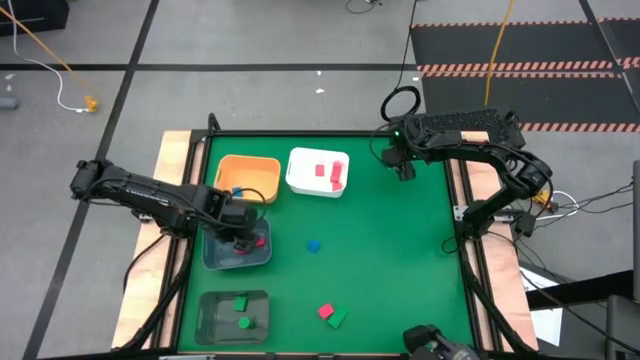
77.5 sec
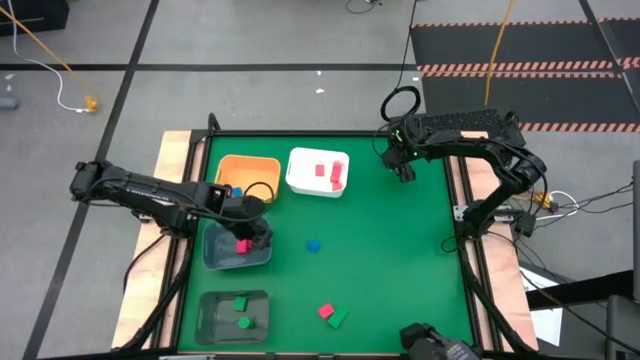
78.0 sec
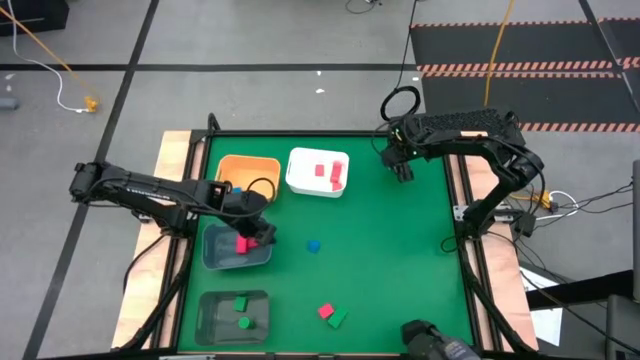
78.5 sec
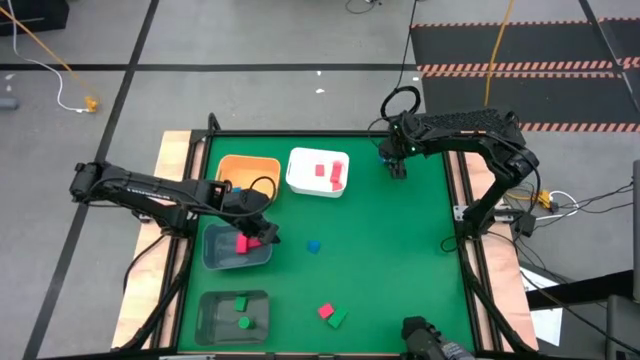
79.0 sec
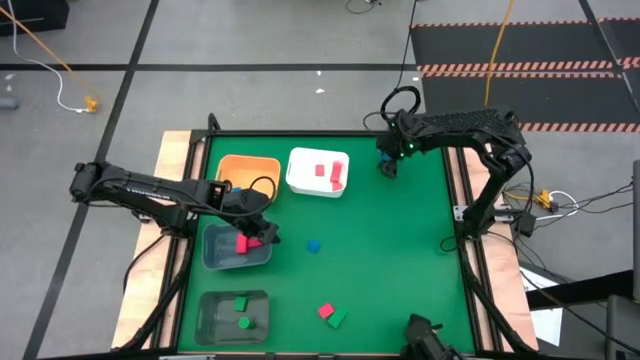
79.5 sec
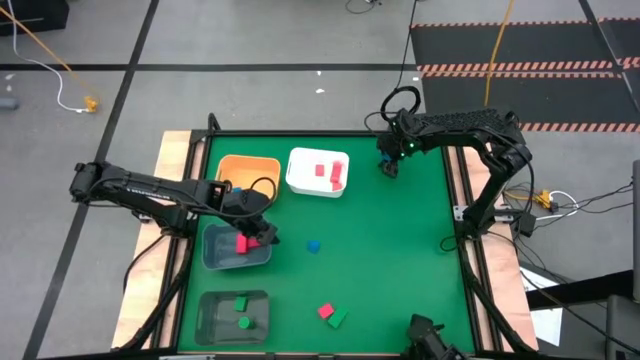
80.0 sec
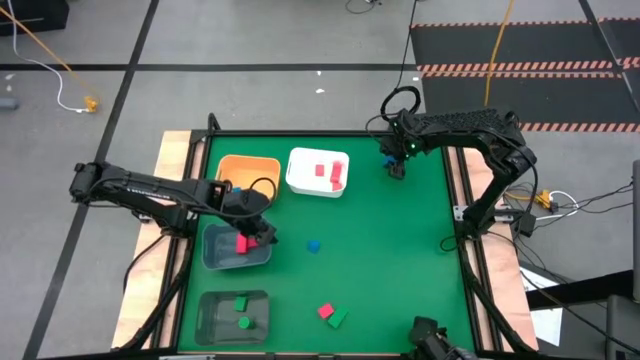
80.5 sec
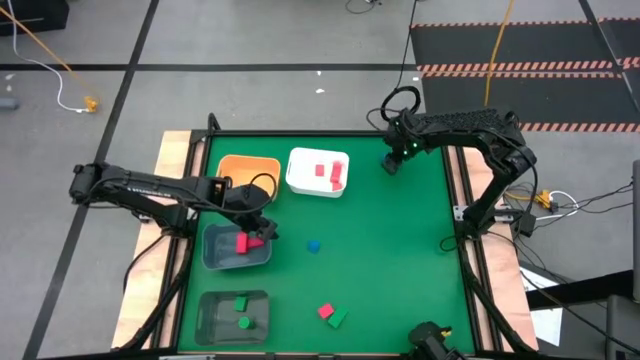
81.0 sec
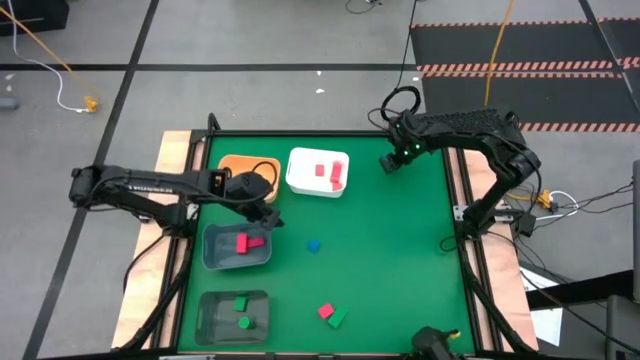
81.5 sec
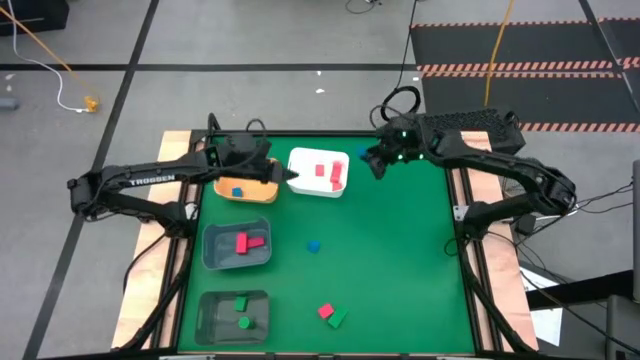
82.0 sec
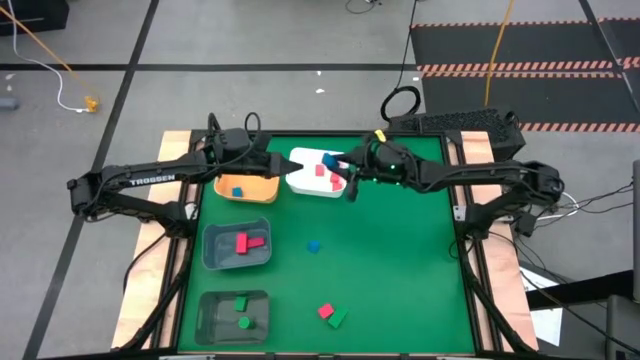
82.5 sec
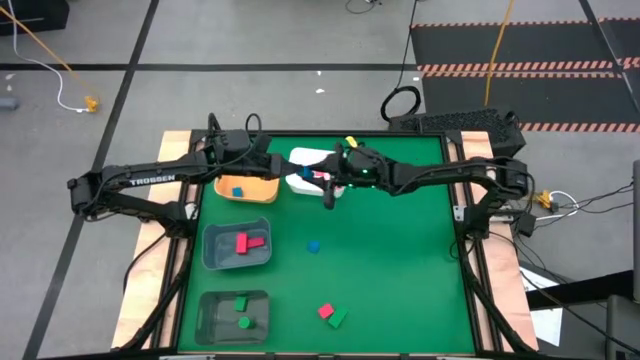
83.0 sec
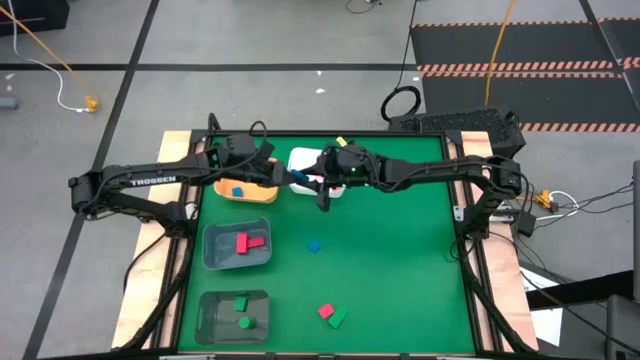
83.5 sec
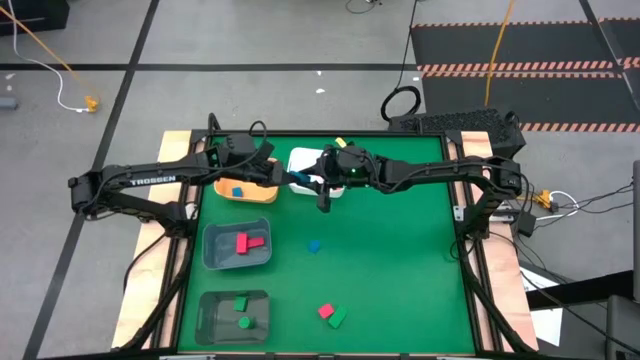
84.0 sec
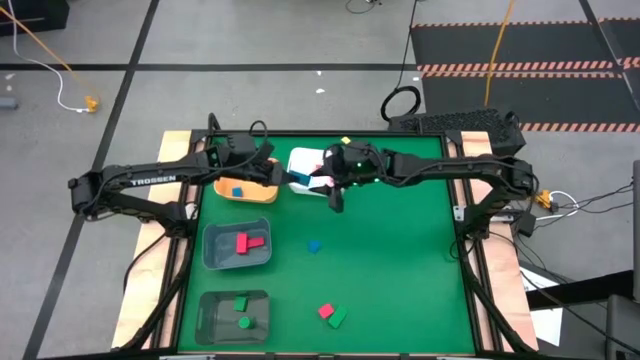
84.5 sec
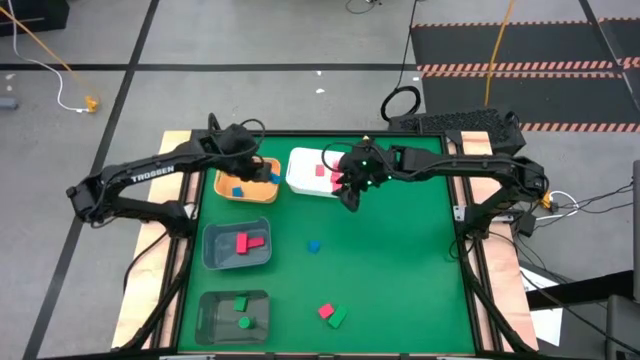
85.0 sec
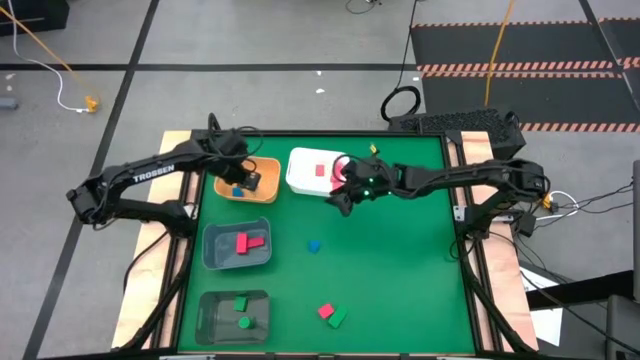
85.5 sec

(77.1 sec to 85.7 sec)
Task: Sort & place blocks by color
Put the top blue block into the yellow bin

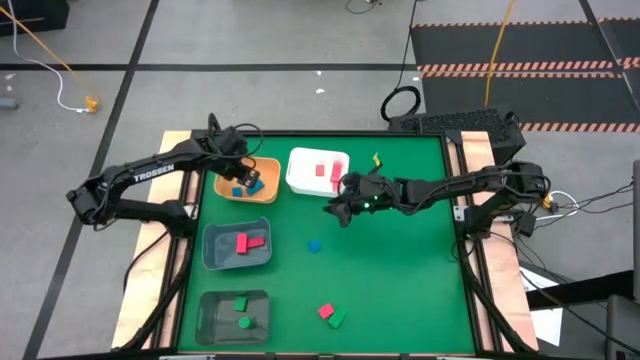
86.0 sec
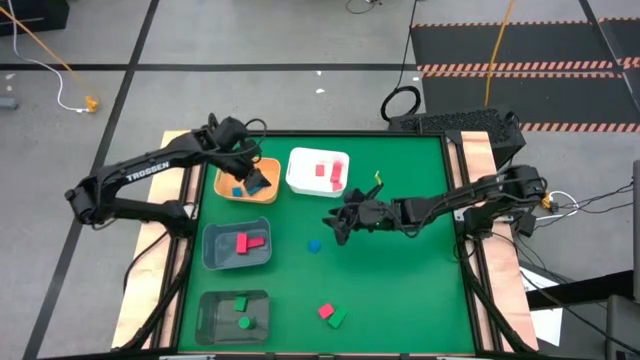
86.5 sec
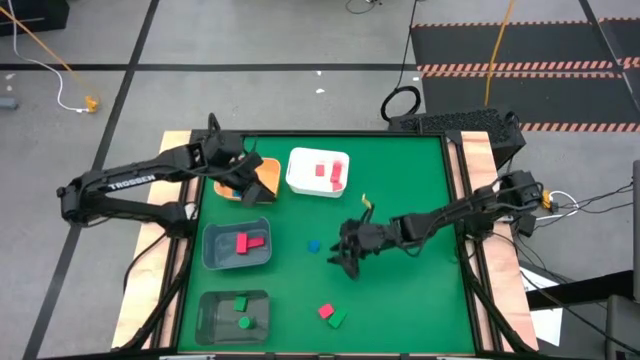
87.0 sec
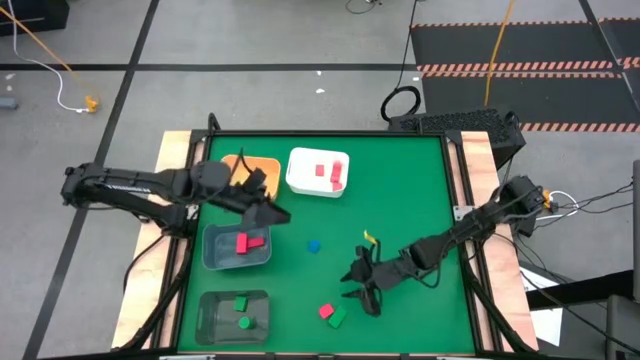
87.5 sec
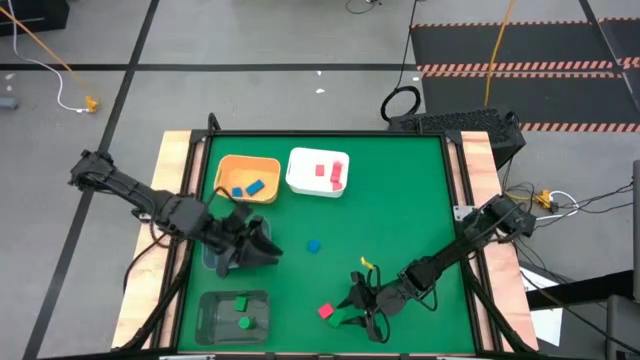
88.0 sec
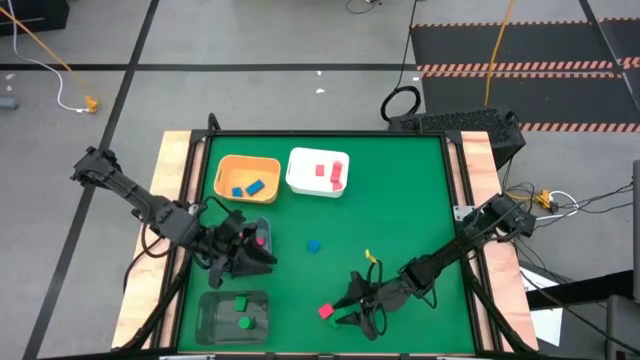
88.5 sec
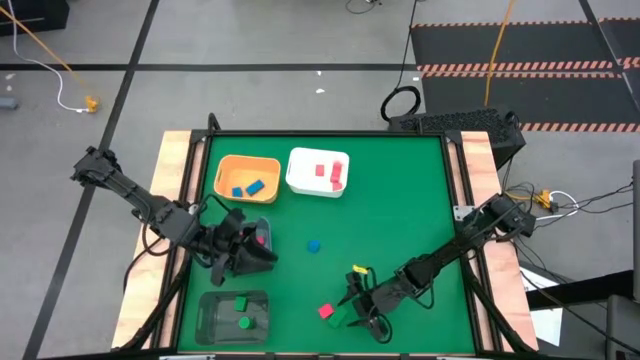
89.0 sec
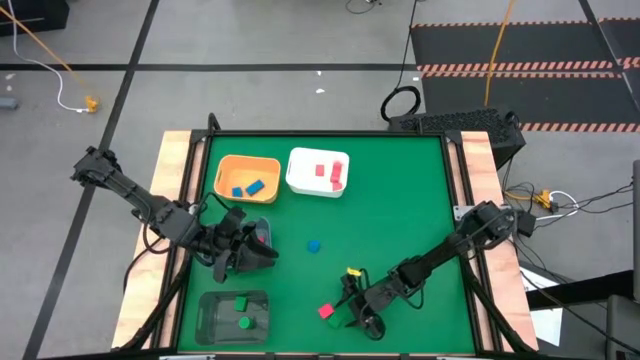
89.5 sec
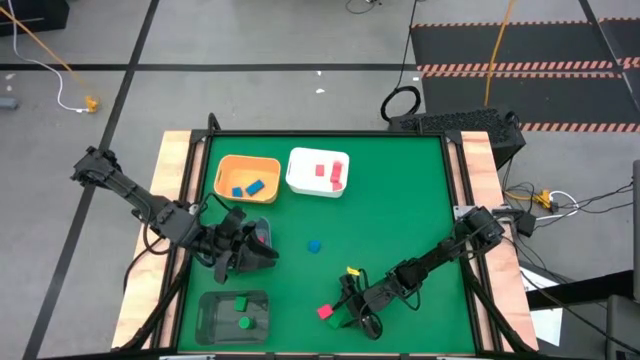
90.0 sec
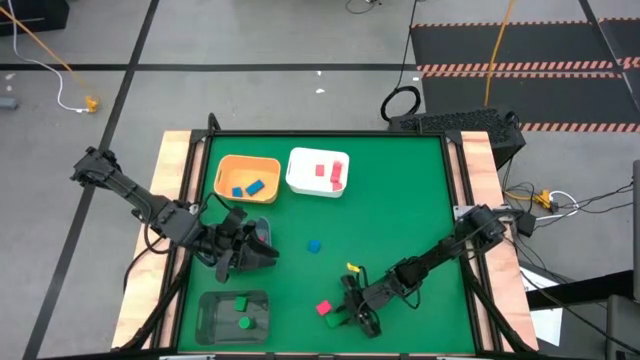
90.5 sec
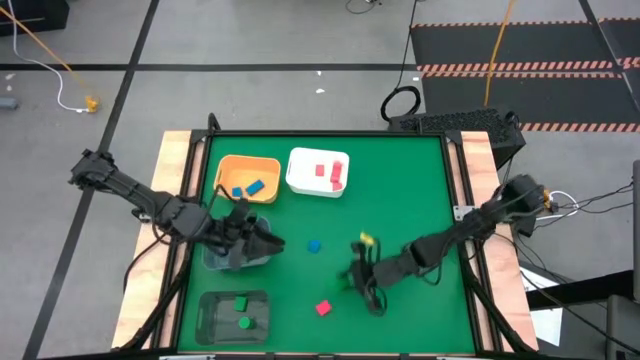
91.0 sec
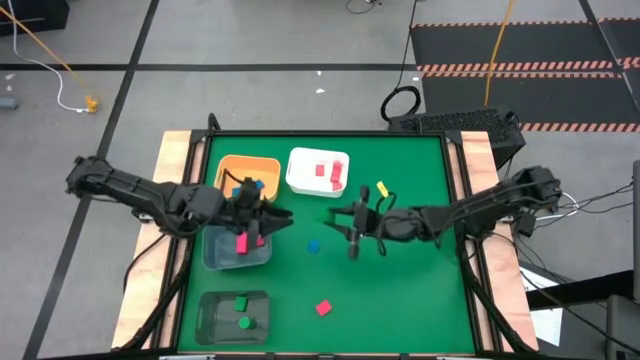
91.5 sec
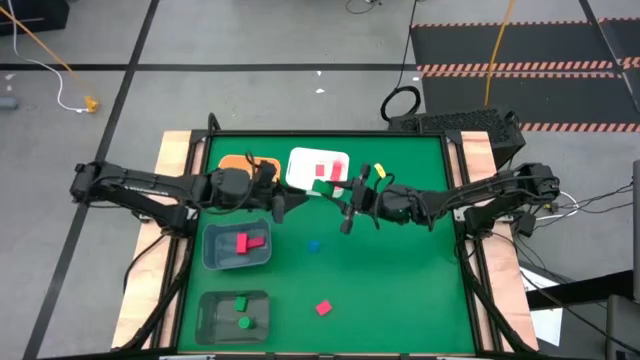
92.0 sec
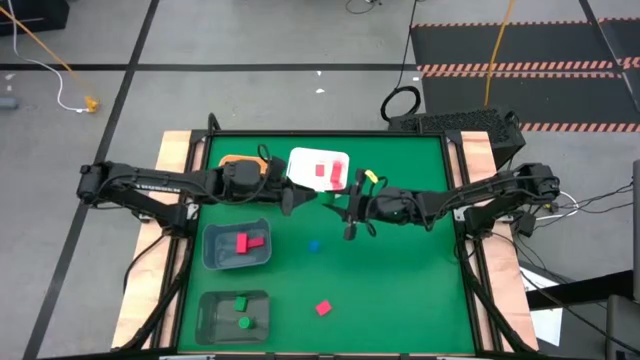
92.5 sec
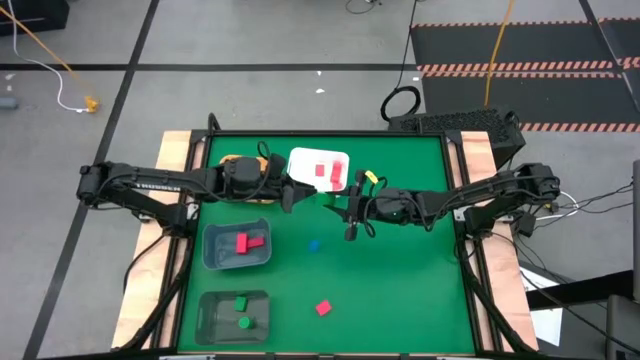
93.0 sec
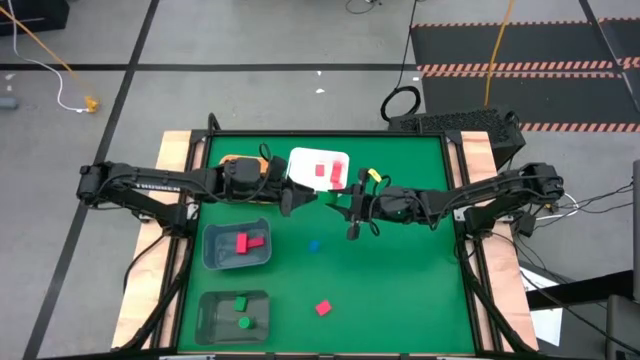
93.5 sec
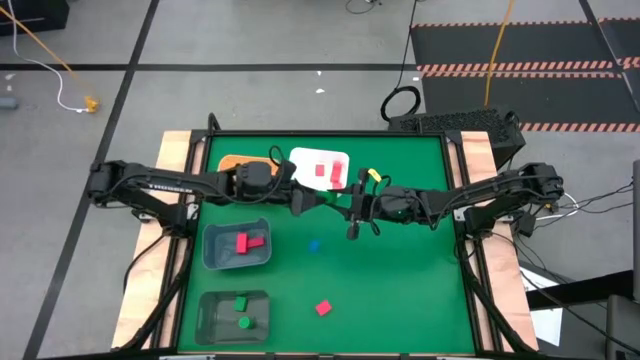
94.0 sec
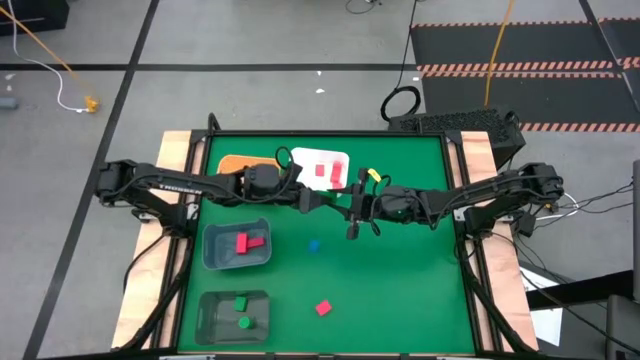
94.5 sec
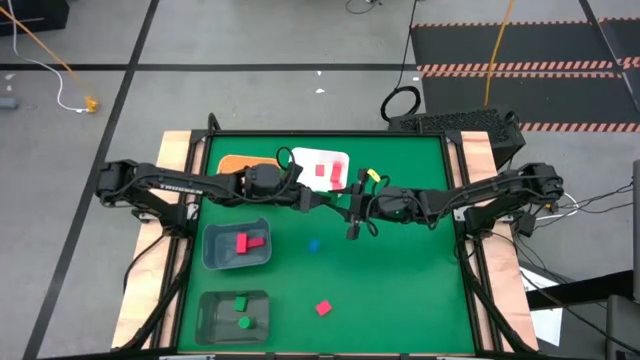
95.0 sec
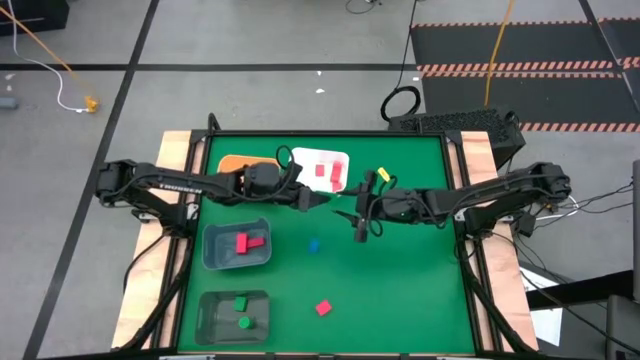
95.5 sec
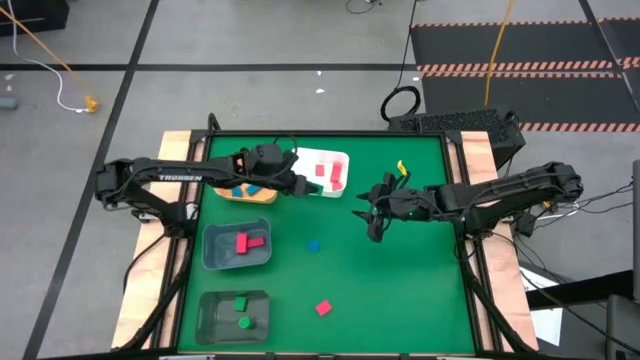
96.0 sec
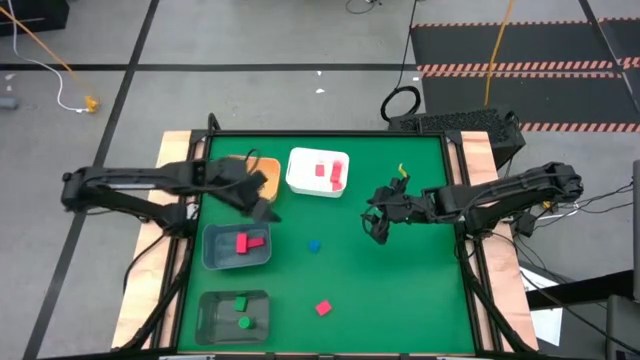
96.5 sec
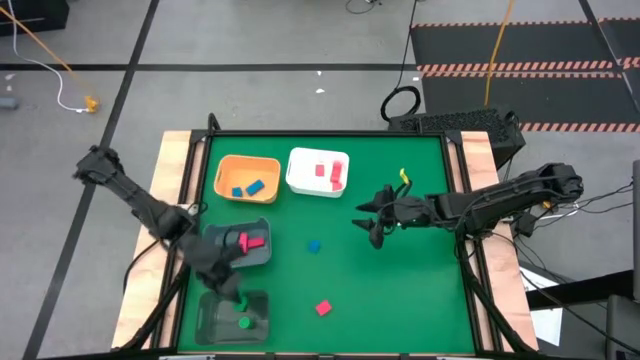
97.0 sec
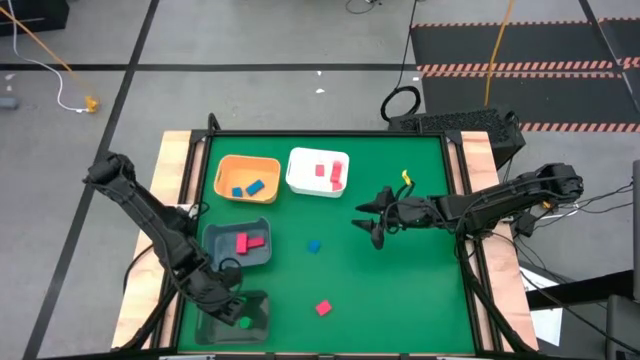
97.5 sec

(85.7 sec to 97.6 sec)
Put the green block into the black bin

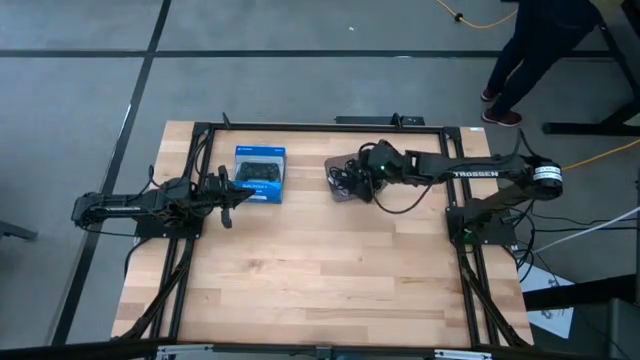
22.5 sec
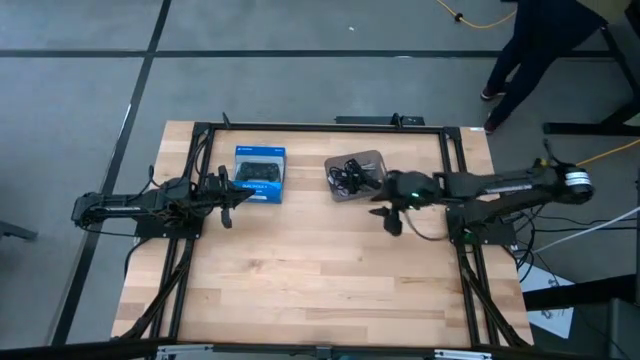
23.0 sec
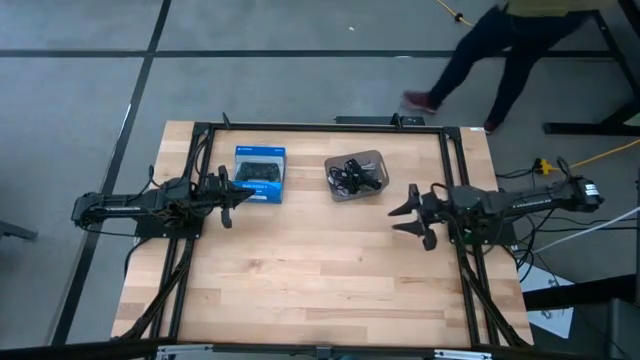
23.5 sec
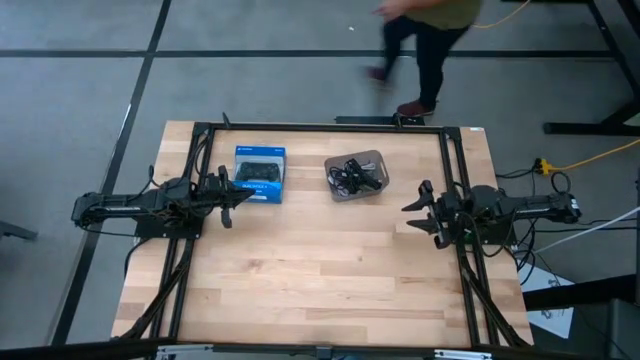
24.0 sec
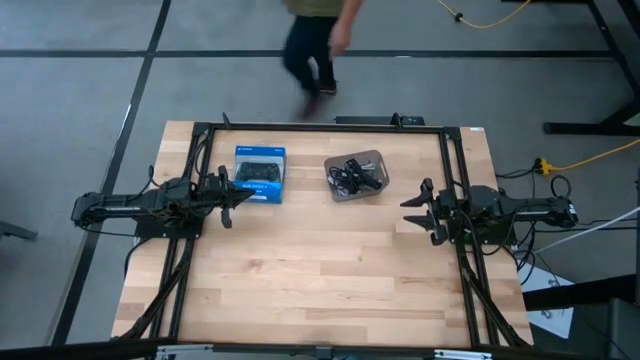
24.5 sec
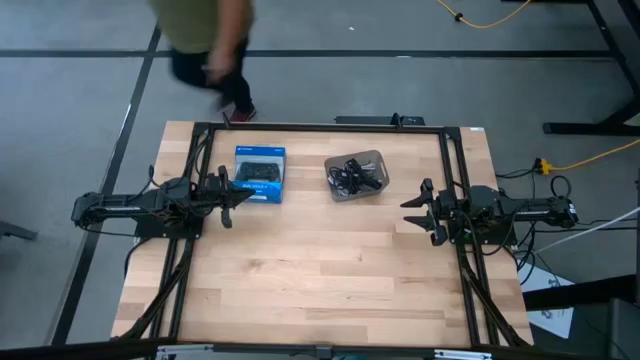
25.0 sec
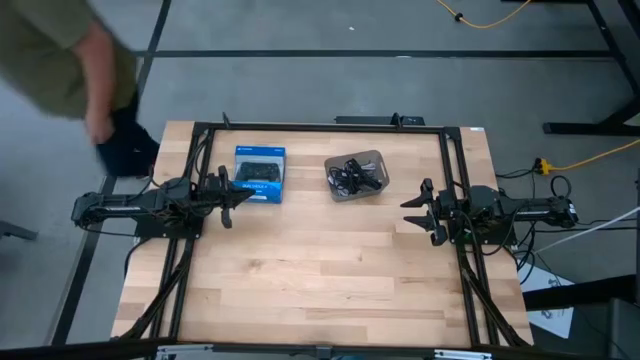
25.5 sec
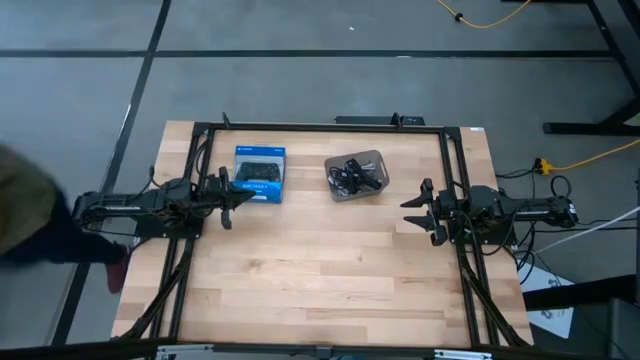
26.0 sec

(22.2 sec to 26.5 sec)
Task: Pick and place USB-C Cables
Return to Home Position
